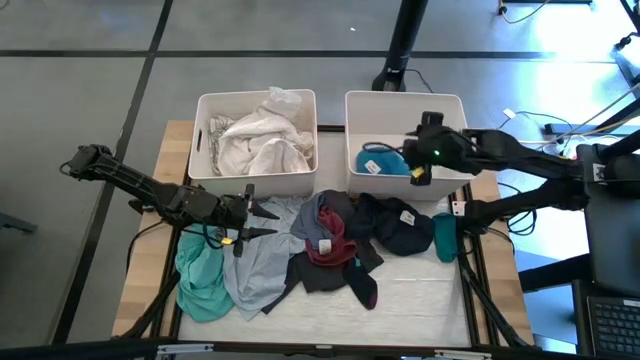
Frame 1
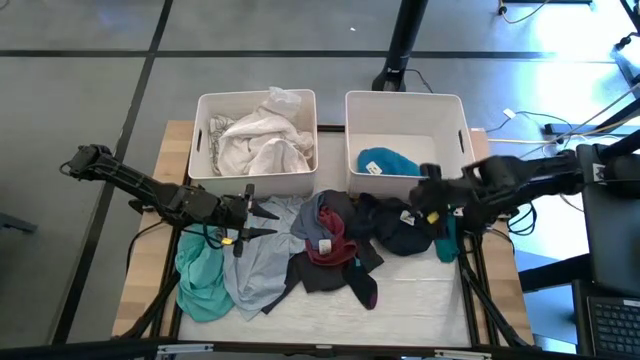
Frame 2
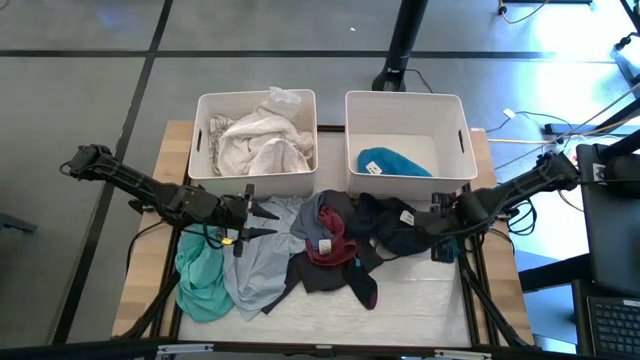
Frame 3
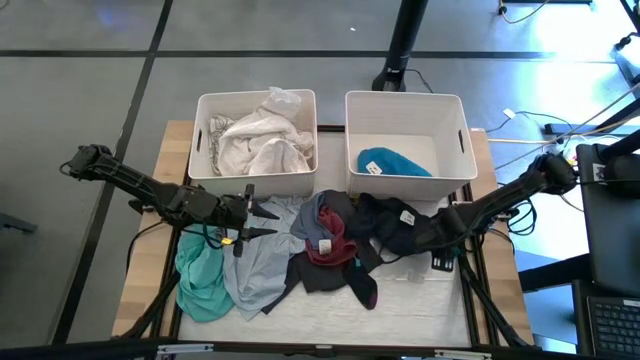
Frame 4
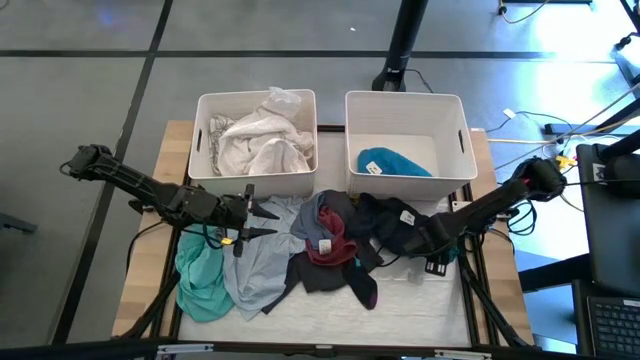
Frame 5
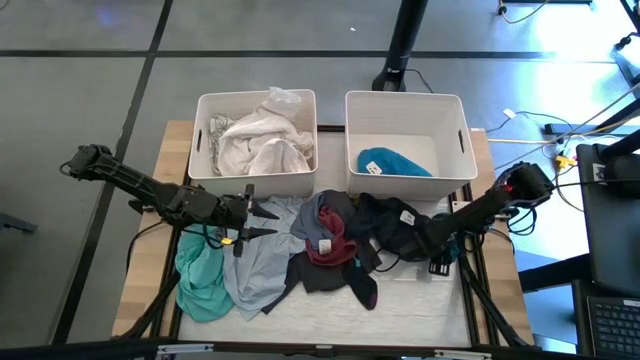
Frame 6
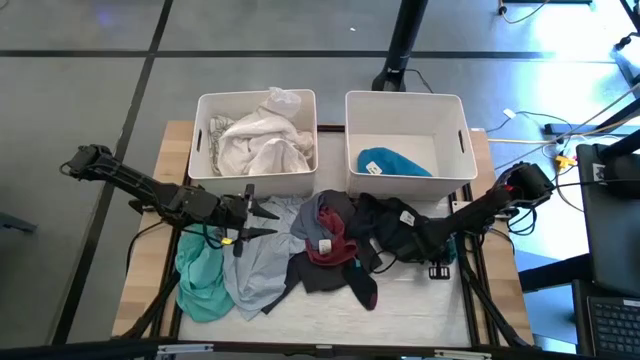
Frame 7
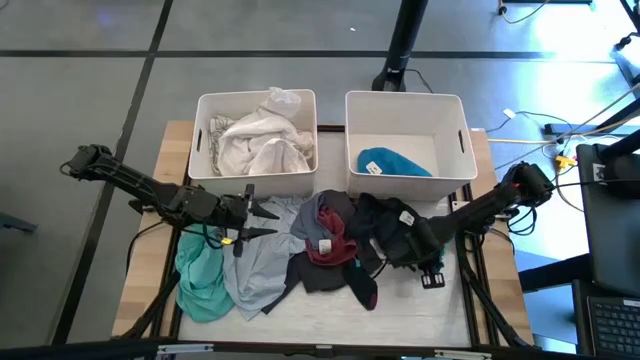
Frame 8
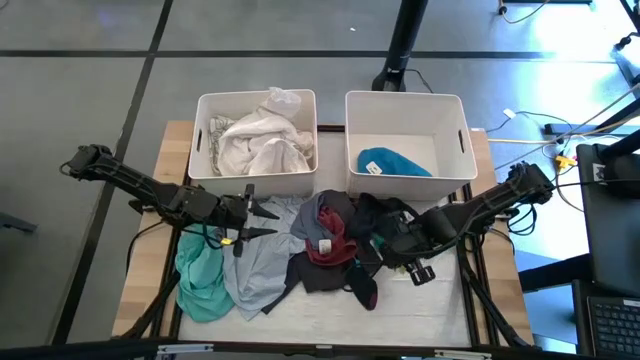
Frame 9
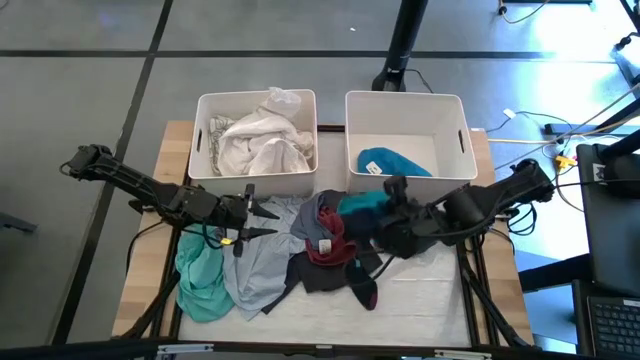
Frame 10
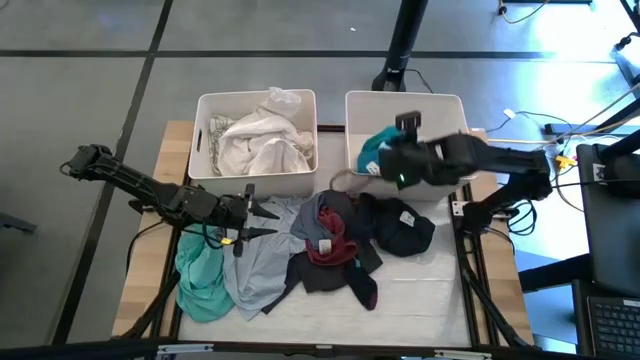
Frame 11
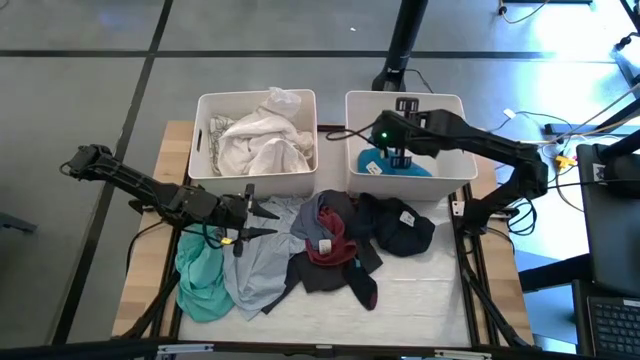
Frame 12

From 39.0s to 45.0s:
Task: Sort clothes
Put the blue sock into the right white bin

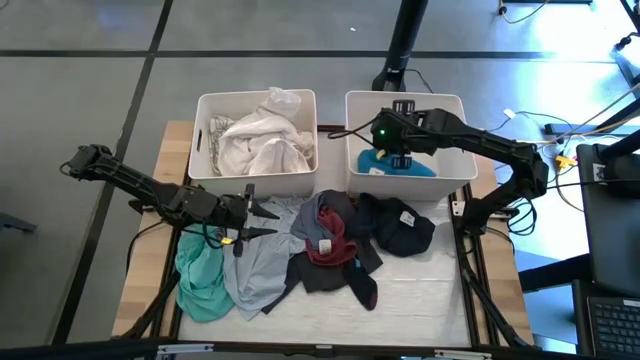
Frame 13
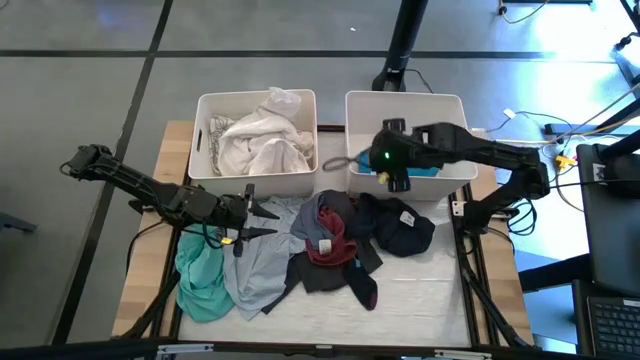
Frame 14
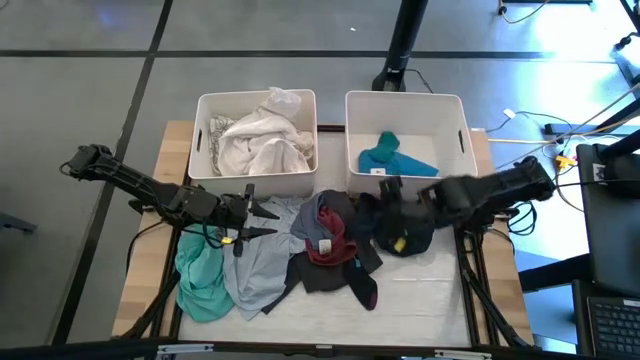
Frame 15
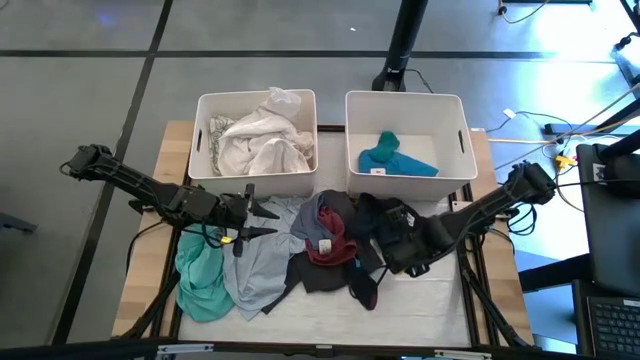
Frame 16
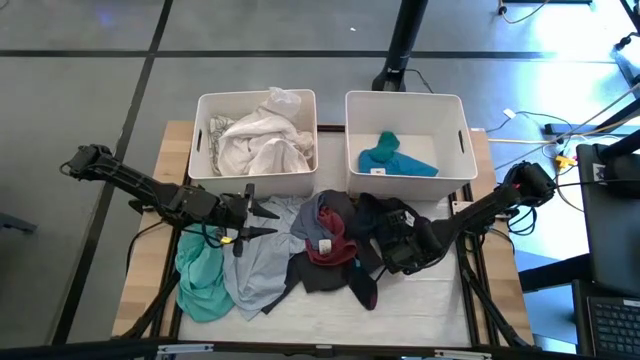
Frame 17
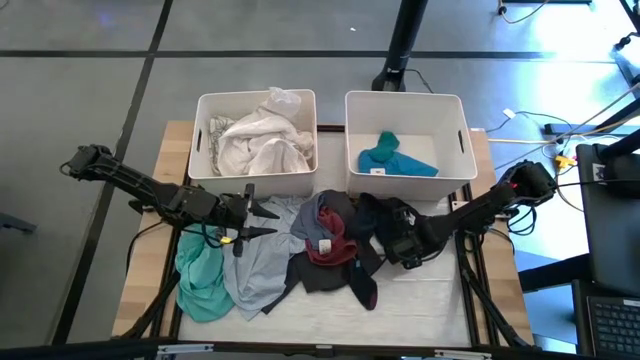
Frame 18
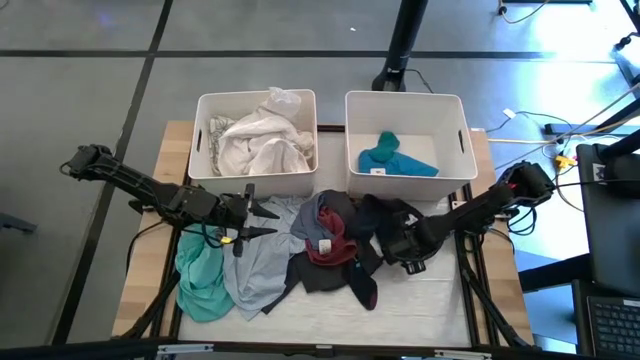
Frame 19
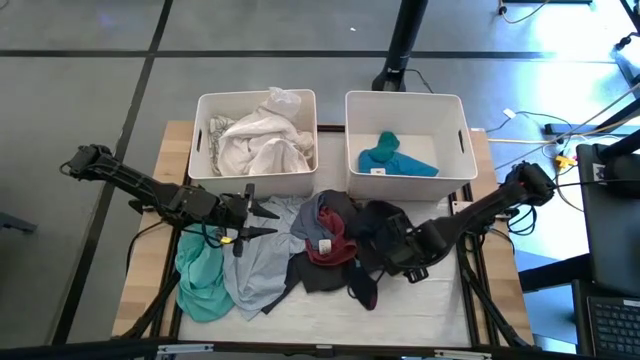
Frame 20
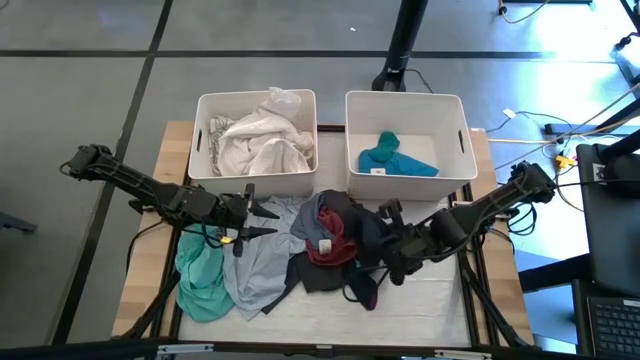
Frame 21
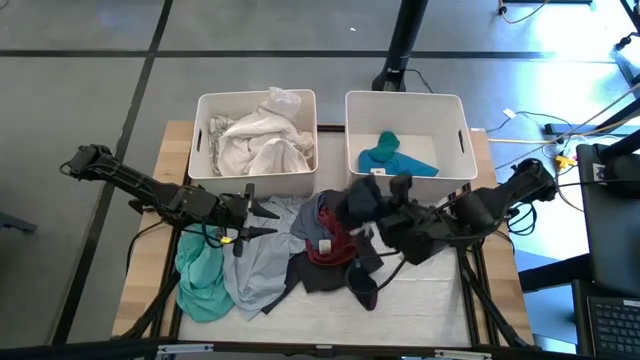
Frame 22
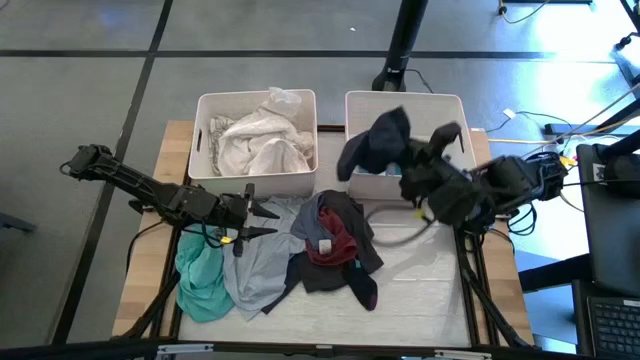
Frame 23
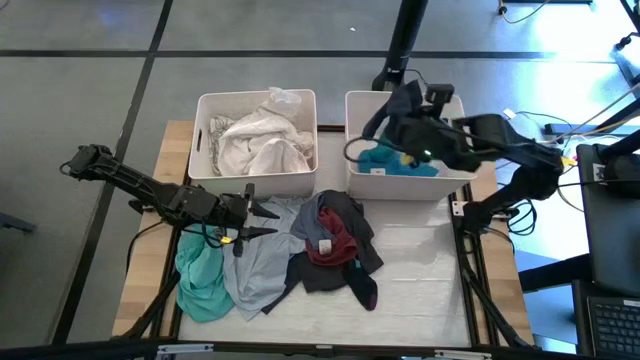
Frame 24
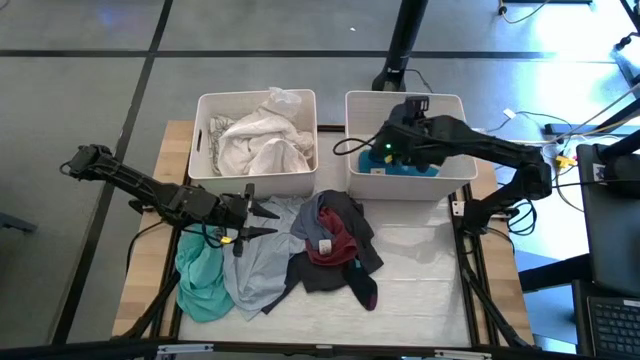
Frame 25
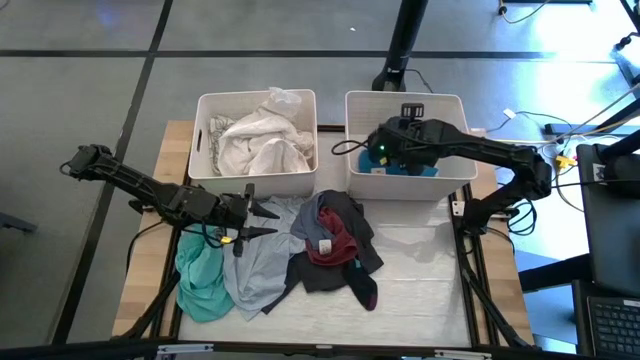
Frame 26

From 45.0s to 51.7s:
Put the dark gray shirt into the right white bin

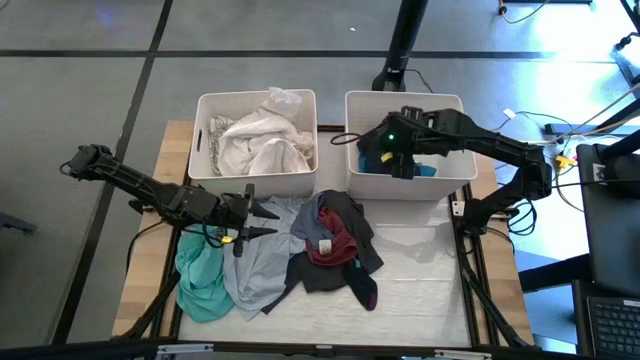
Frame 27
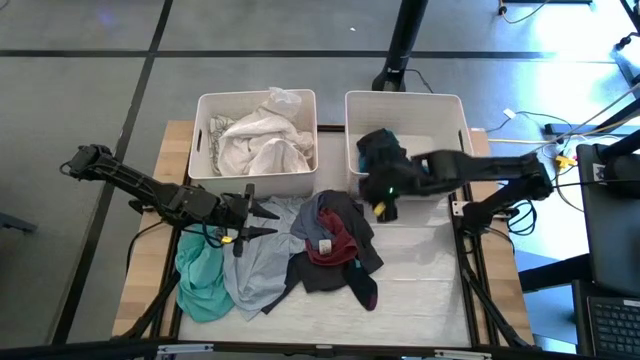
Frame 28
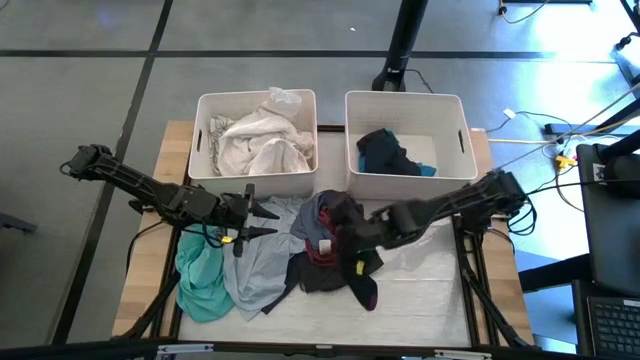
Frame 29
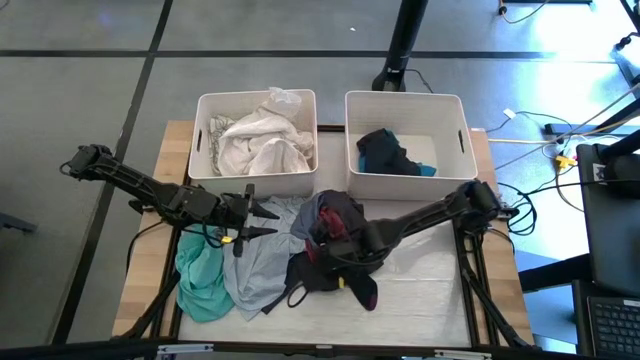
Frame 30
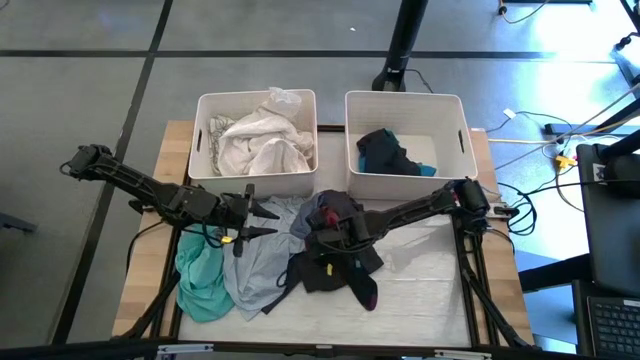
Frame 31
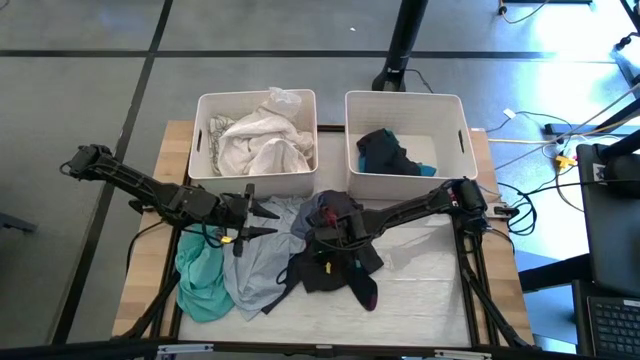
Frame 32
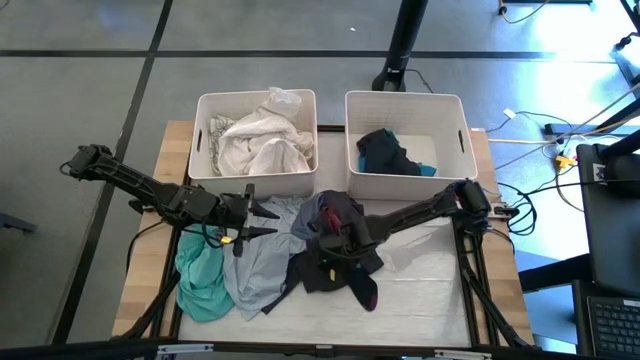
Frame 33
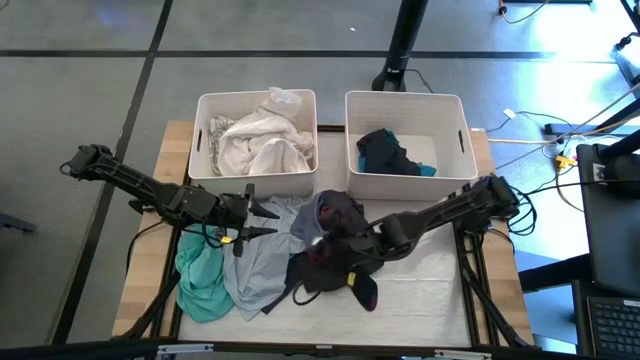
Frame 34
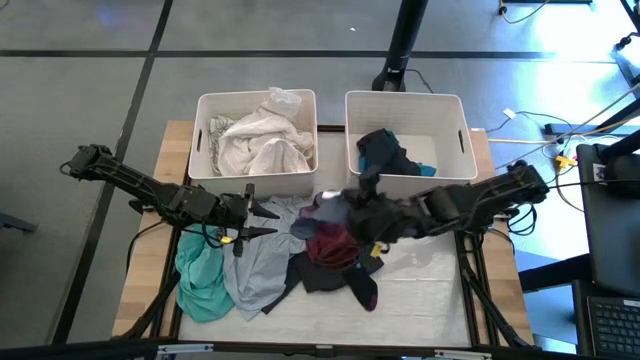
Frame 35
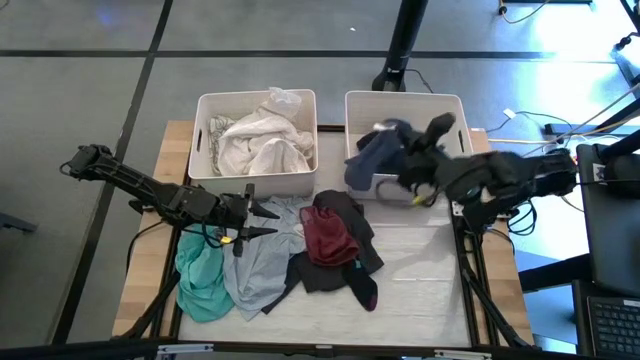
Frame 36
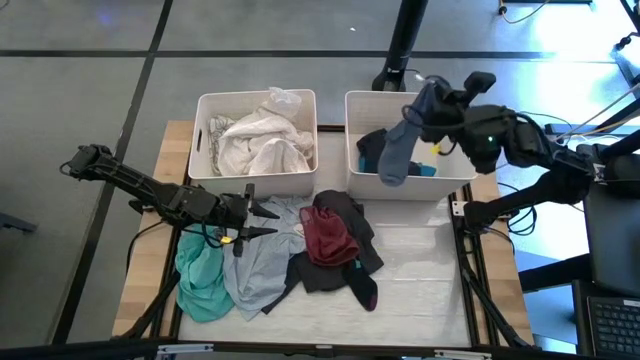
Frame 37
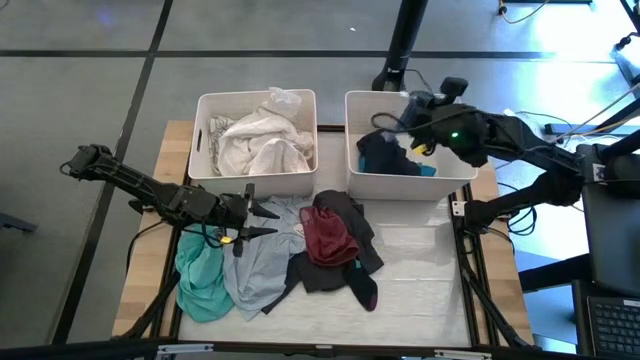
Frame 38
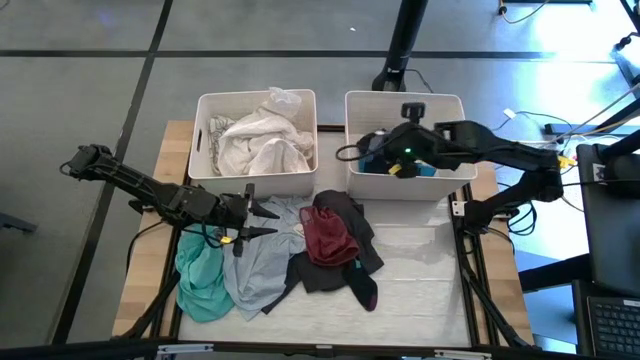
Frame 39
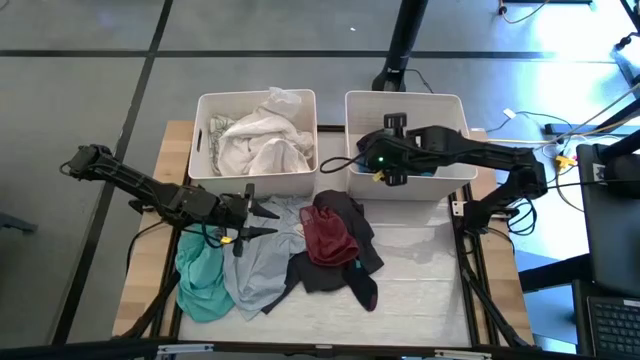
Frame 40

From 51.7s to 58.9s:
Put the purple sock into the right white bin

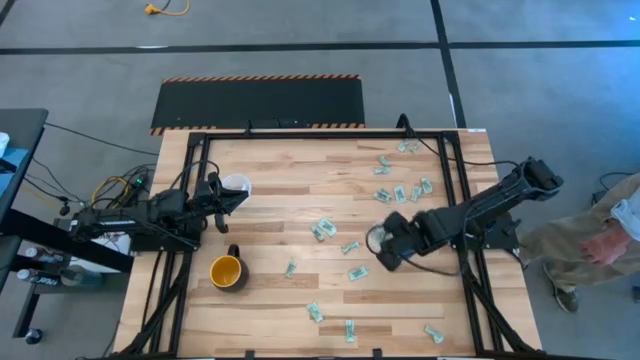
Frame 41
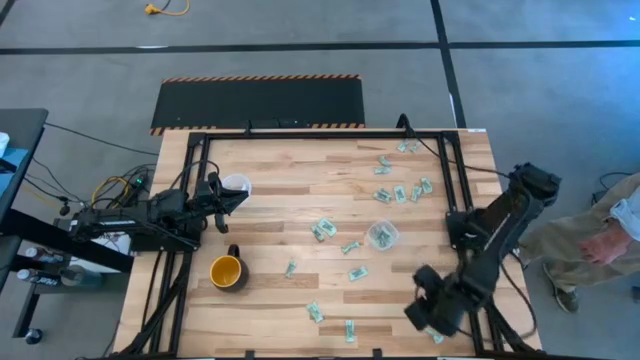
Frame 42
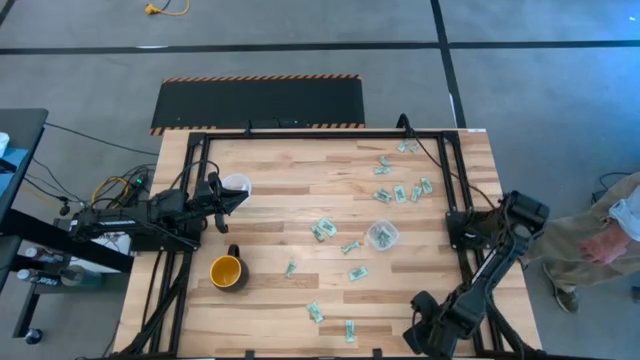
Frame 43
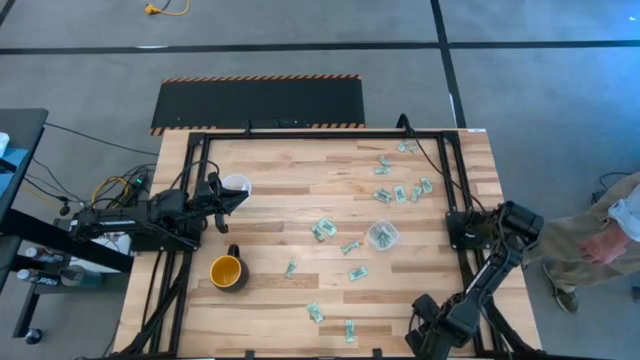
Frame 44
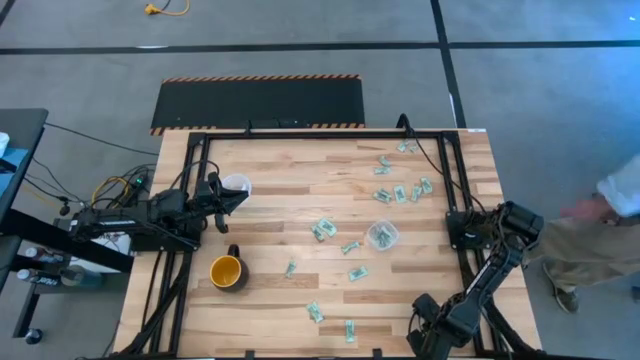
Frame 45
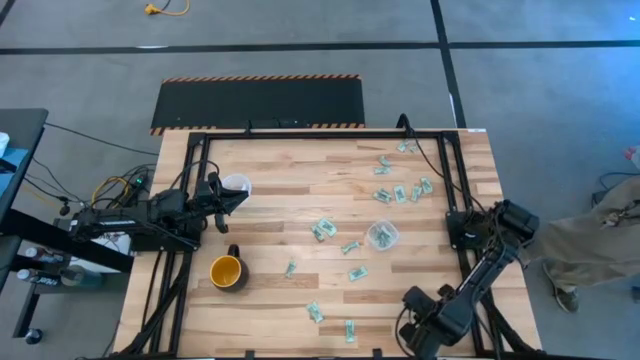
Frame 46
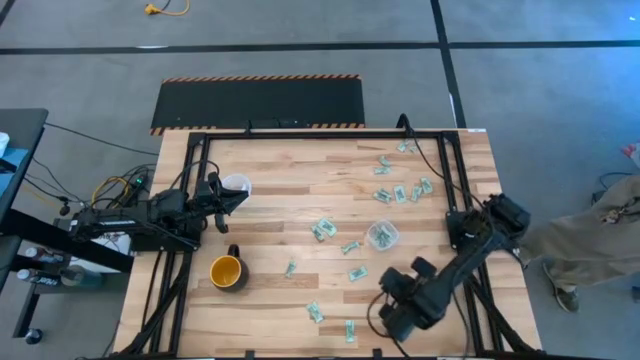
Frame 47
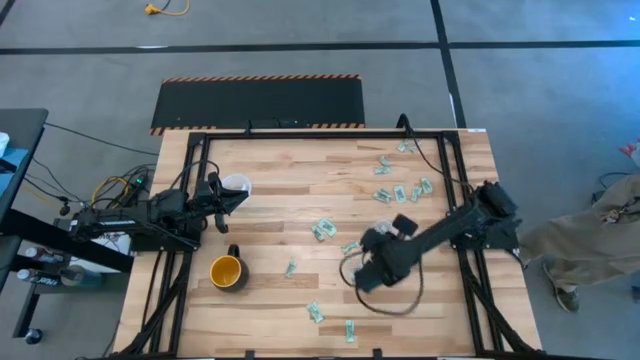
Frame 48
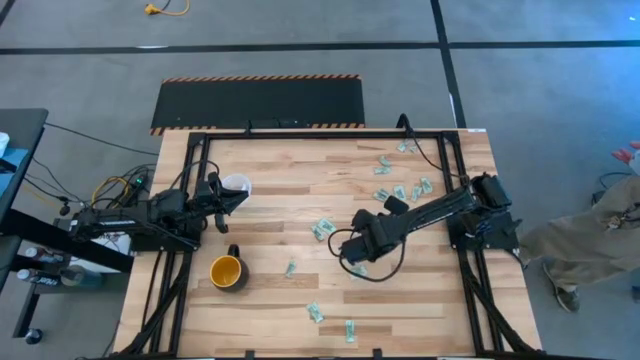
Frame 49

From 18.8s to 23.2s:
Task: Pick and place Stevia / Truvia into bins
Put the white stevia packet into the square transparent container
